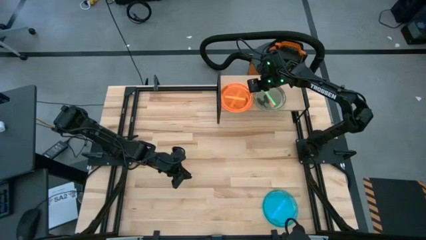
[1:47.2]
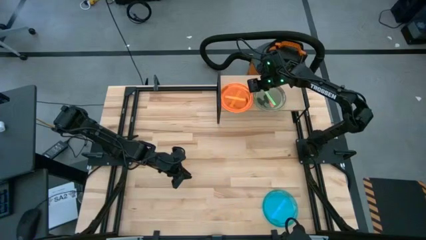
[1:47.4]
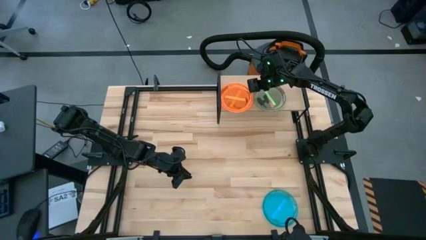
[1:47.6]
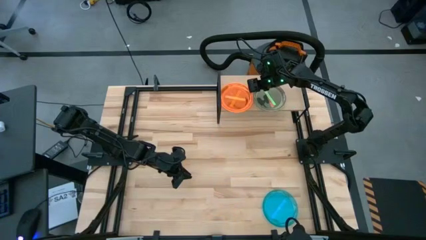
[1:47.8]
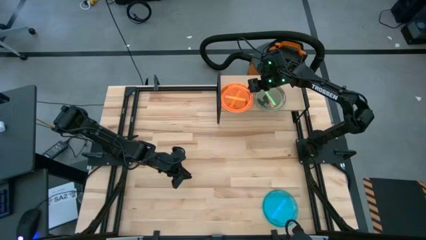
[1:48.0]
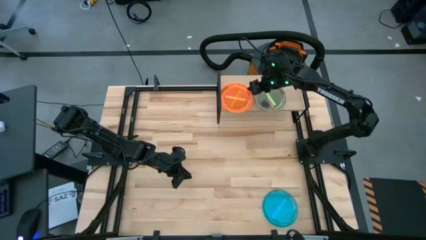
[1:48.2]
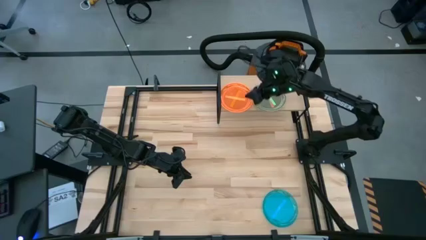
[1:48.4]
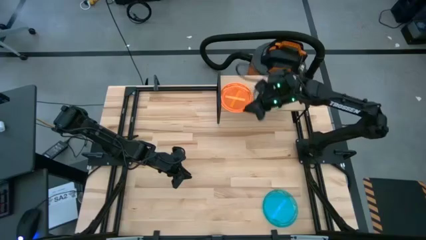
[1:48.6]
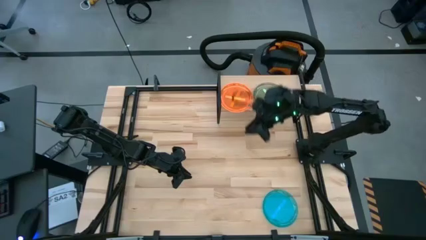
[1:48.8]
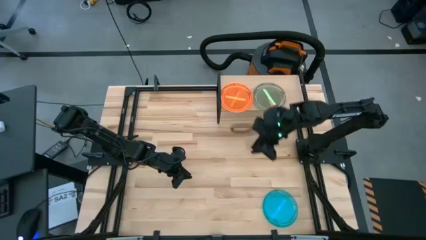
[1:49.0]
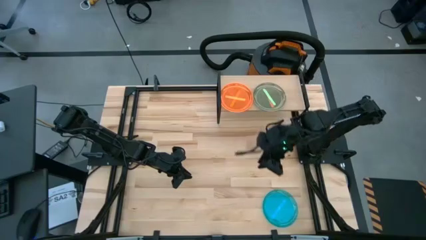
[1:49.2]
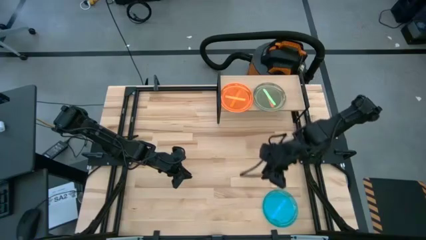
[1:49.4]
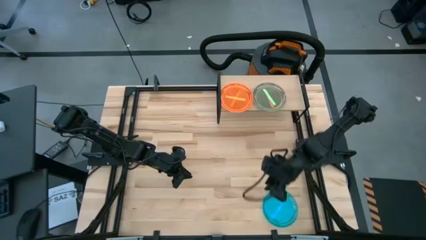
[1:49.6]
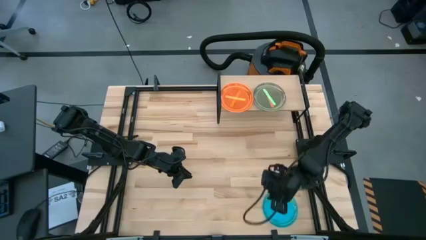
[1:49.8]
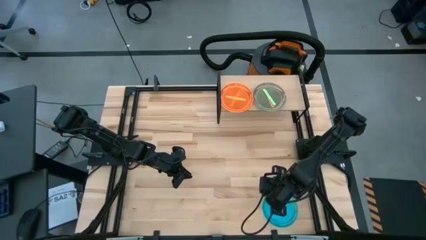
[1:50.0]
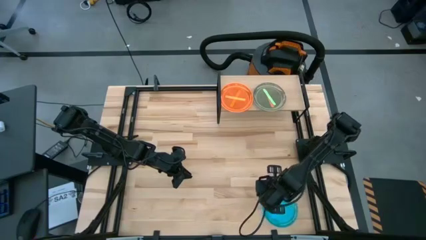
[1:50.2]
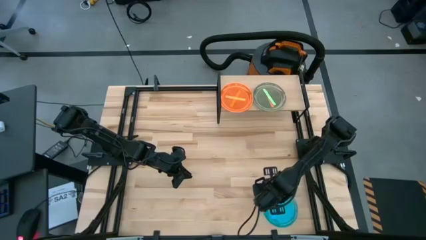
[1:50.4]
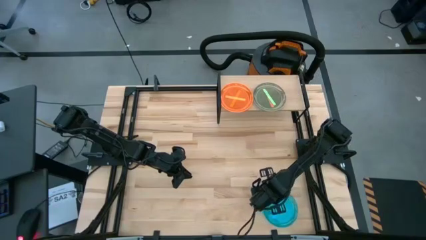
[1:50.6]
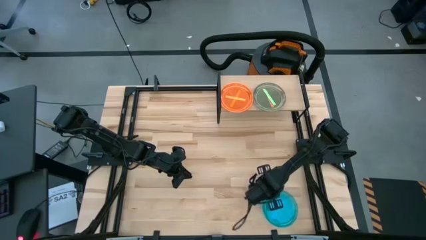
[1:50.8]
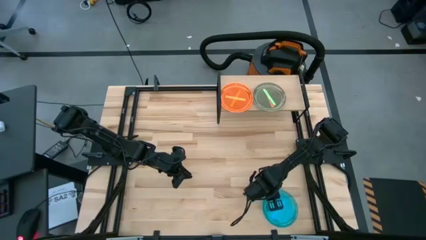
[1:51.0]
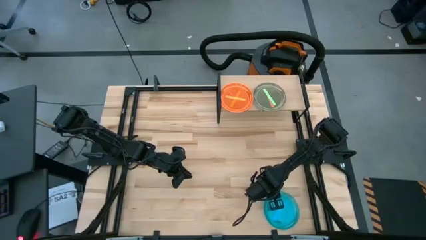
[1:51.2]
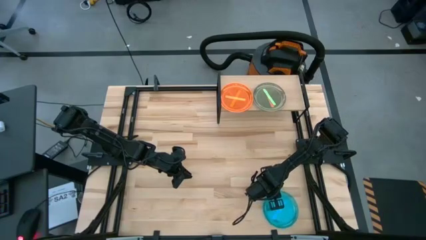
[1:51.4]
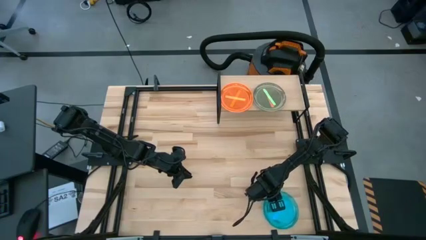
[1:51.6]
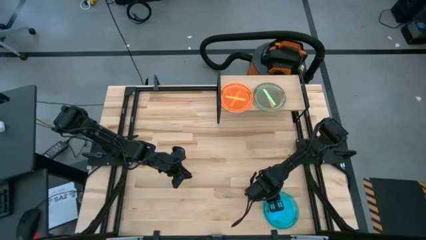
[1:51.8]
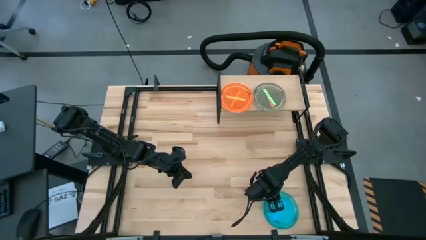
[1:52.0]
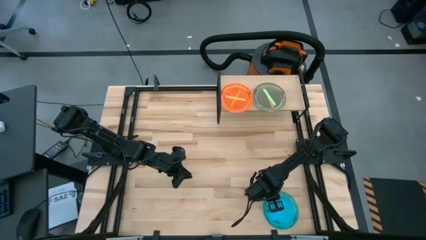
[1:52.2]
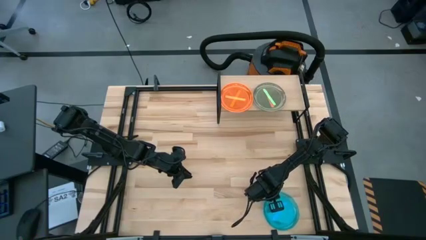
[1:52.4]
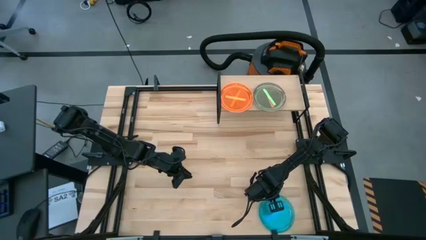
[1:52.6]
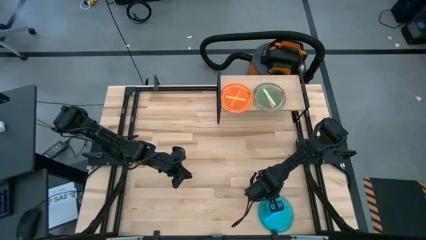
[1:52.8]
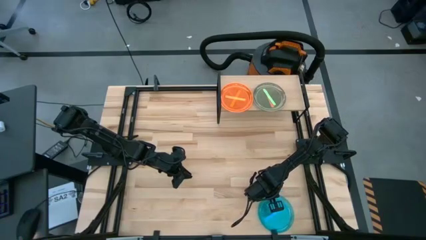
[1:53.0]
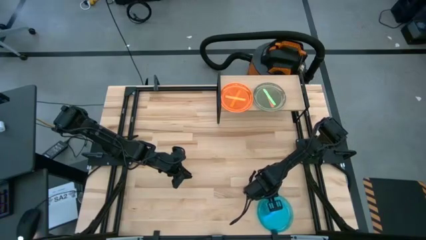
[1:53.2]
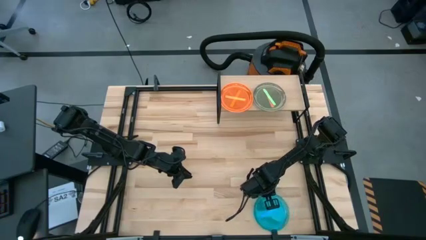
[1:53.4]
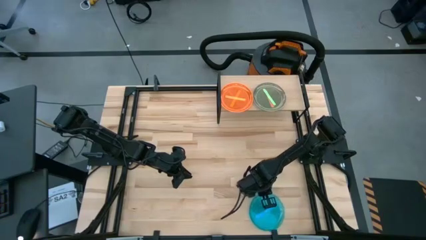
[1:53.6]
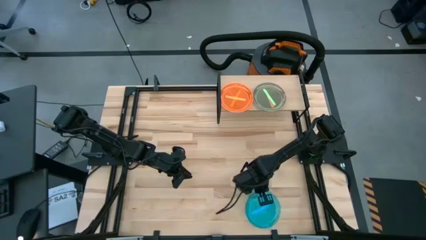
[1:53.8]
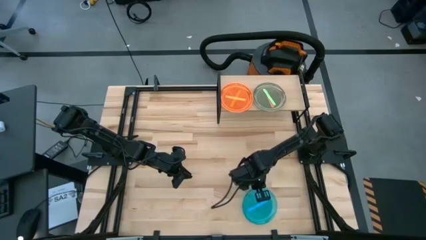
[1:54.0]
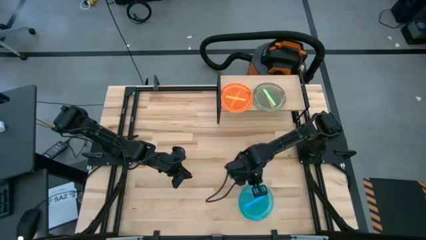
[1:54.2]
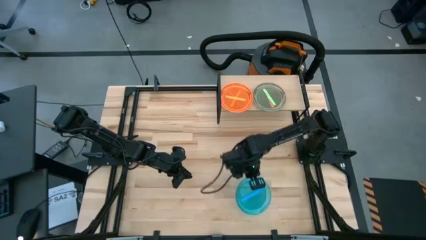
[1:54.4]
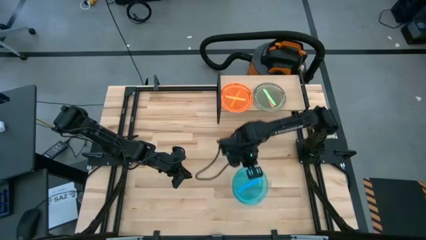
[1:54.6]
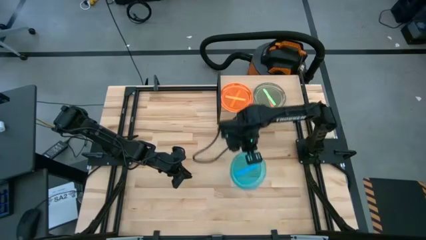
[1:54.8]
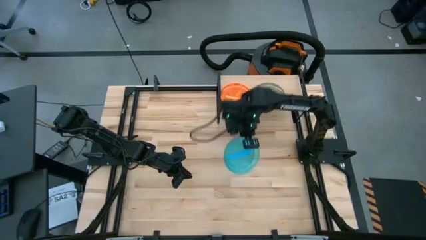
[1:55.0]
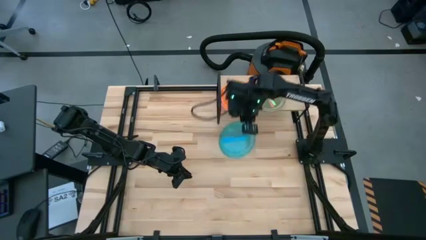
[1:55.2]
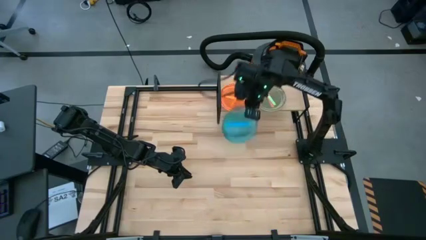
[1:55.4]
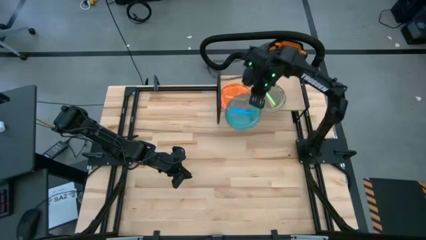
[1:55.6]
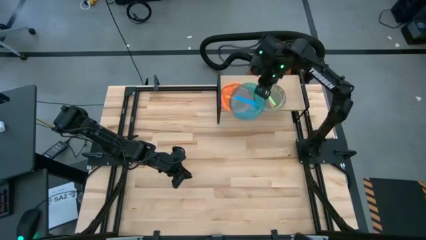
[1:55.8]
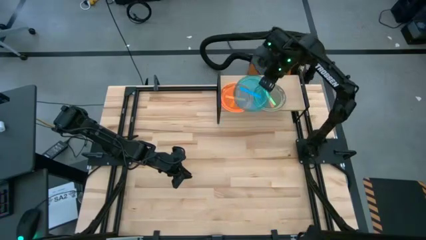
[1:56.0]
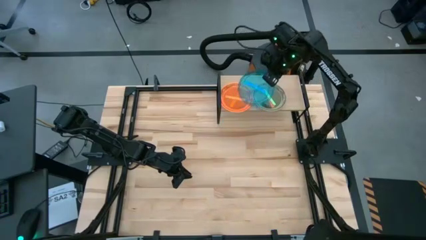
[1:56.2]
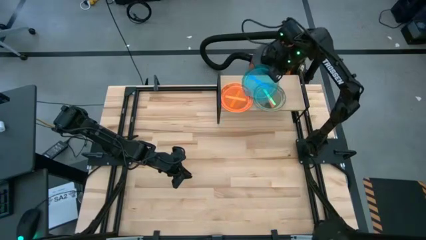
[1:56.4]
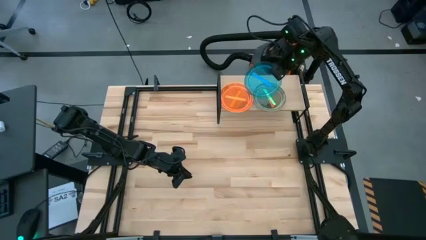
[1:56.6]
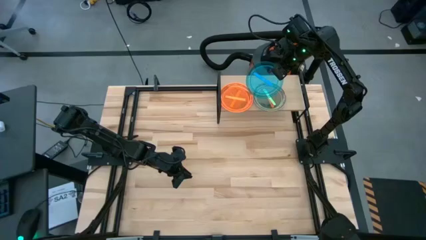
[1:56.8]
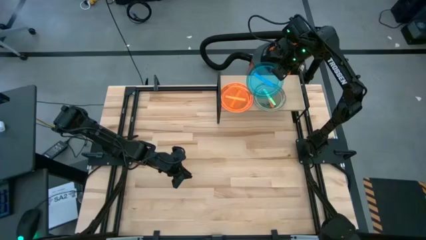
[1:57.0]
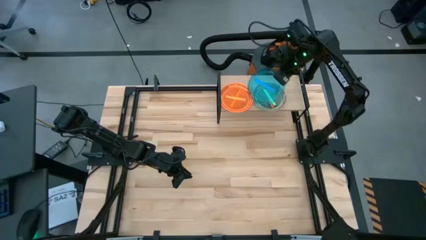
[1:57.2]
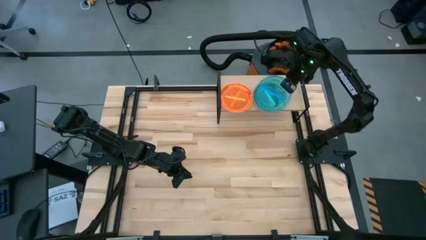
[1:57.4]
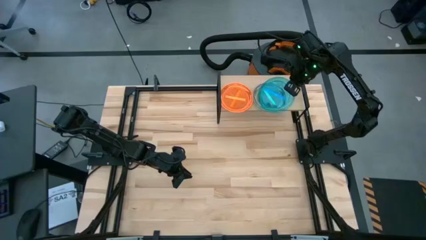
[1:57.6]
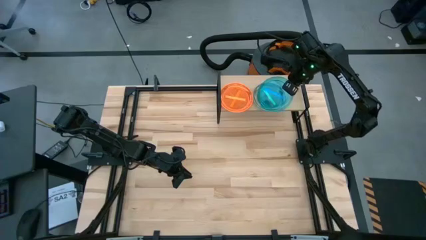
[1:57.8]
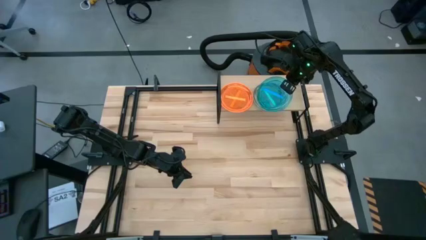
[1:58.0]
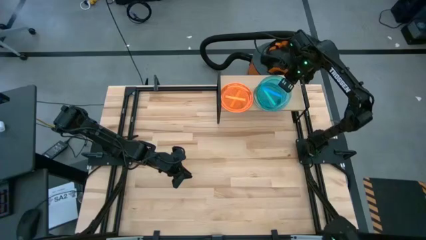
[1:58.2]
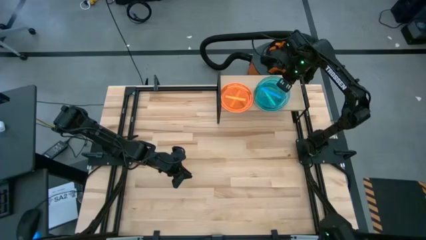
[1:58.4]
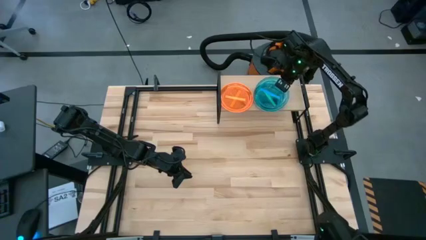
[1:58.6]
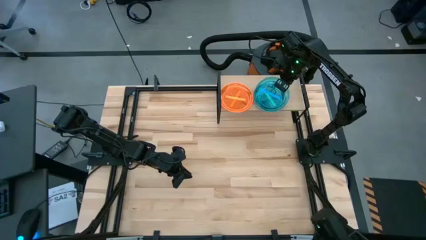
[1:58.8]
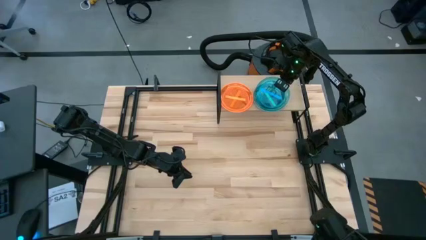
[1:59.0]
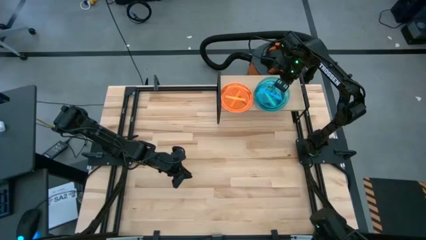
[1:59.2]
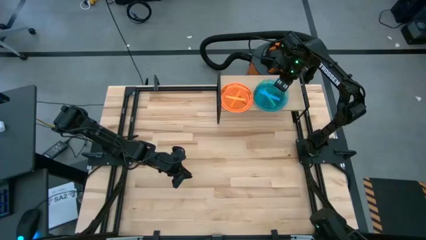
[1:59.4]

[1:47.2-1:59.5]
Task: Place and stack plates onto a shelf
Stack the blue plate on top of the green plate on the shelf

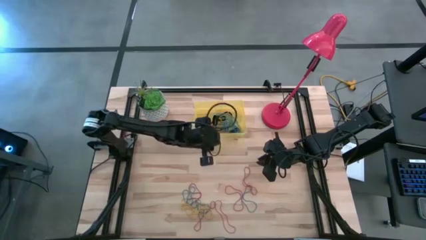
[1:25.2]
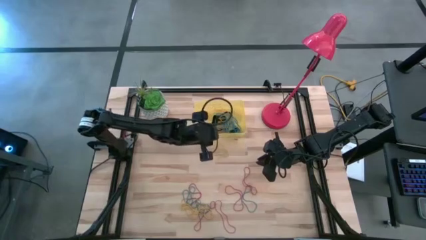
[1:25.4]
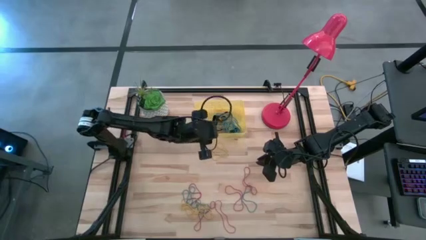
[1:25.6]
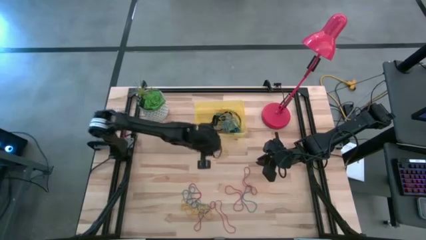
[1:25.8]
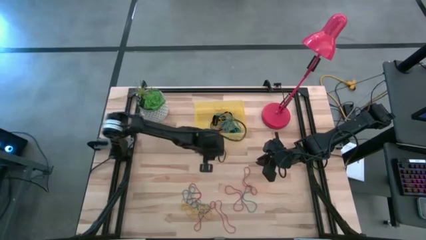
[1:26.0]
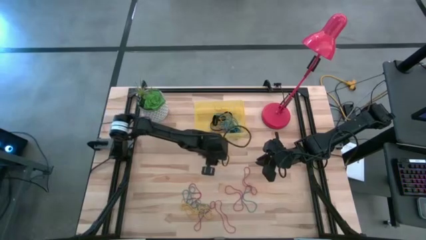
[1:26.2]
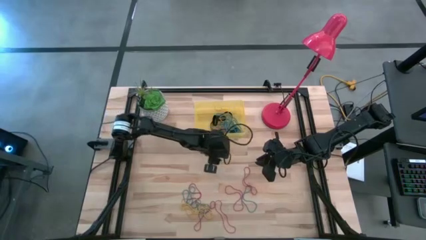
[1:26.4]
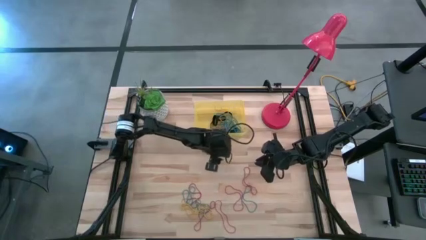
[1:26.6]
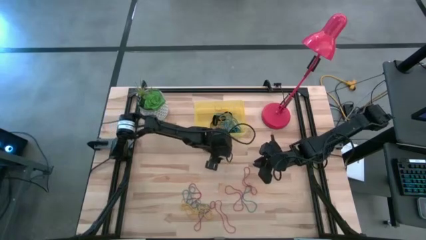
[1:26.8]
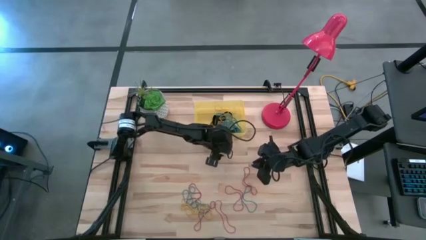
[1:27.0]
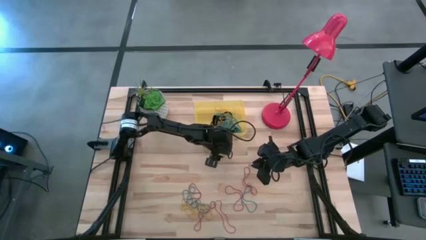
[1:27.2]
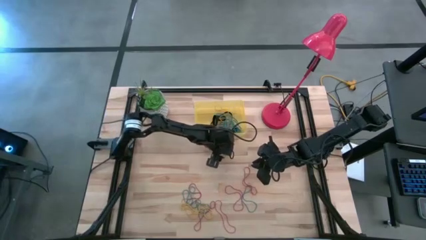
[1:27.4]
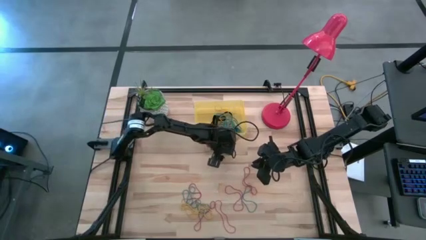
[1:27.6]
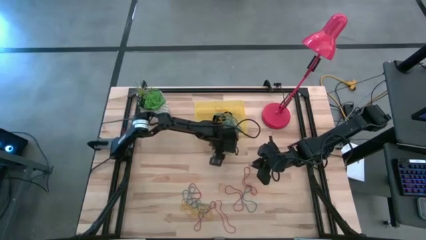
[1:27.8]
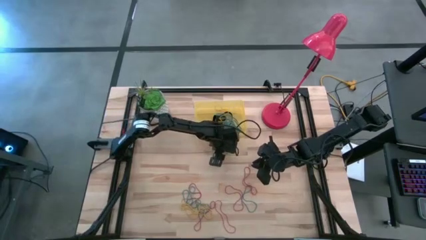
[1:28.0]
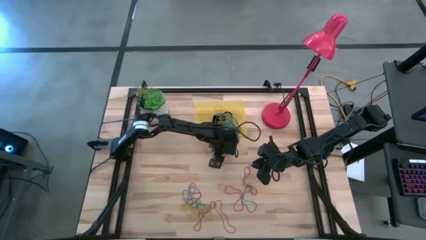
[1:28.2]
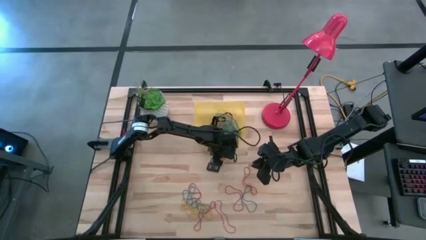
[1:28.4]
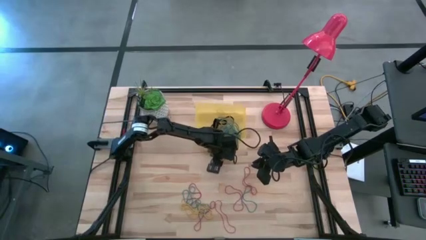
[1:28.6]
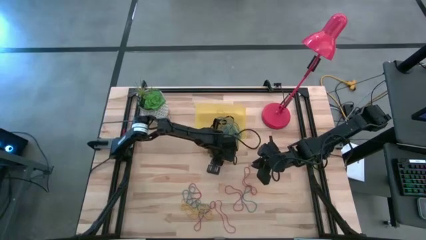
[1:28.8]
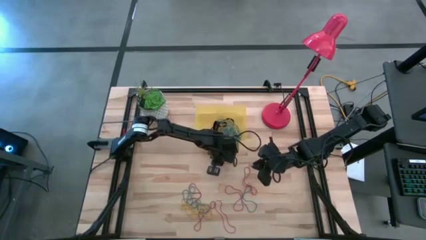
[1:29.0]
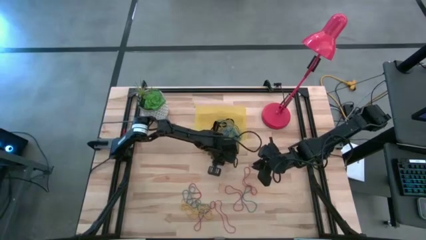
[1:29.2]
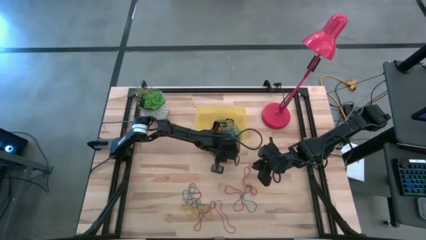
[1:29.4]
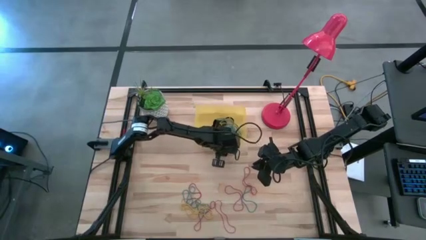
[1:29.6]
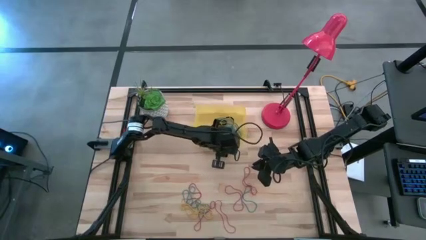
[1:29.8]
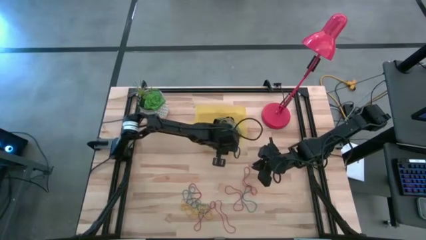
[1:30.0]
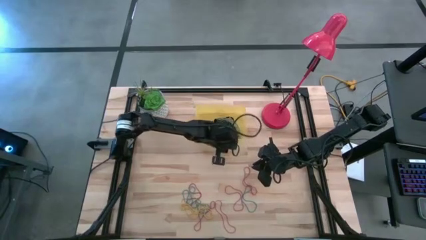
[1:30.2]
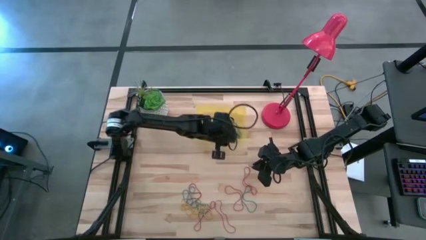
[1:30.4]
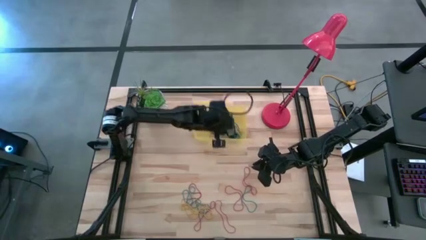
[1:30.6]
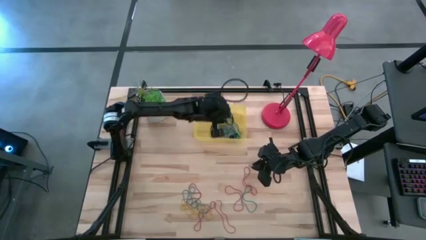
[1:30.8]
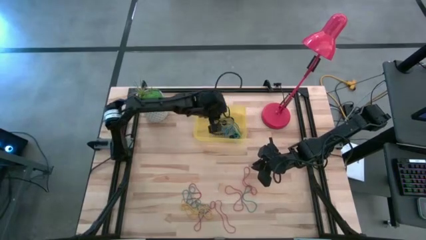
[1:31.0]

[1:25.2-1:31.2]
Task: Pick and place rubber bands into bin
Put the yellow rubber band into the yellow bin
